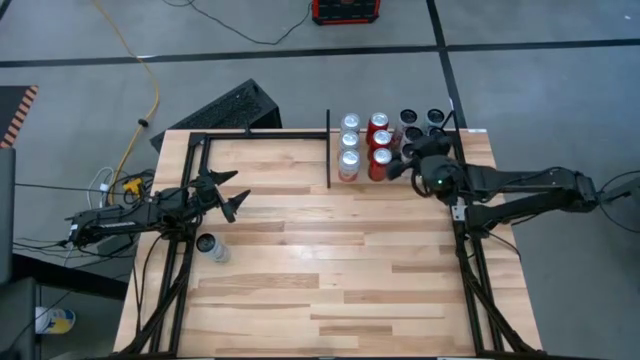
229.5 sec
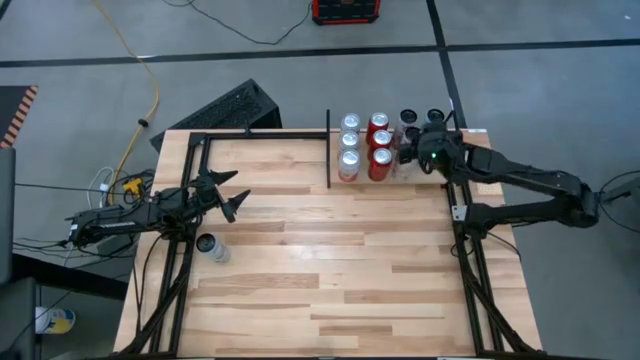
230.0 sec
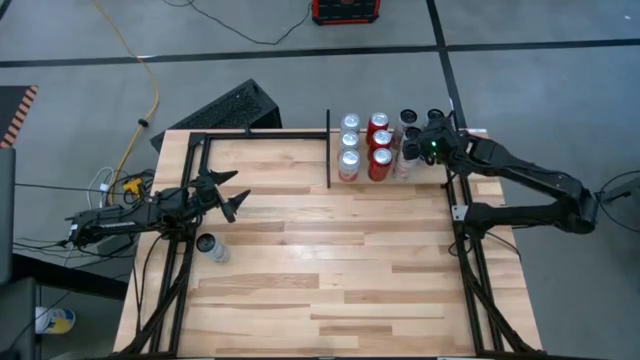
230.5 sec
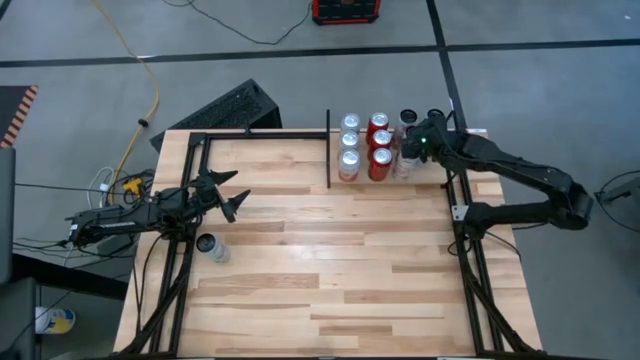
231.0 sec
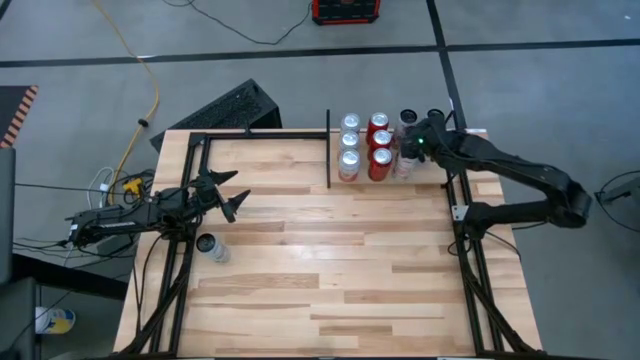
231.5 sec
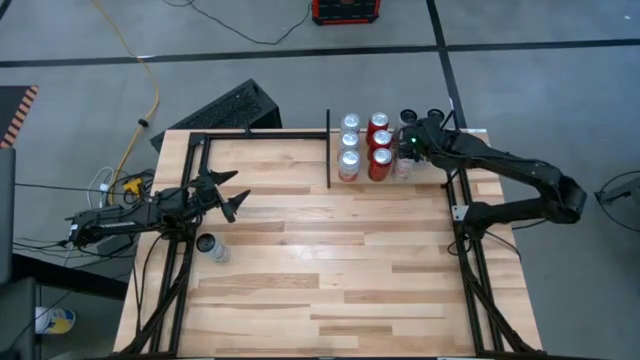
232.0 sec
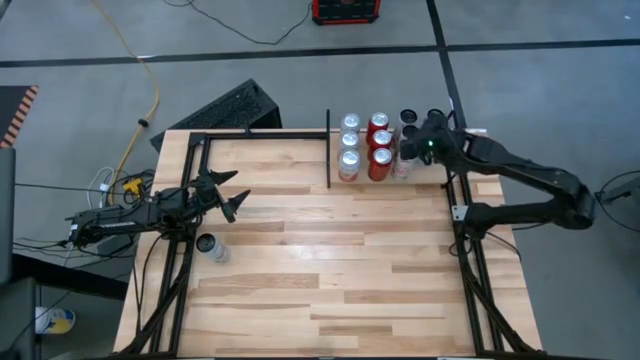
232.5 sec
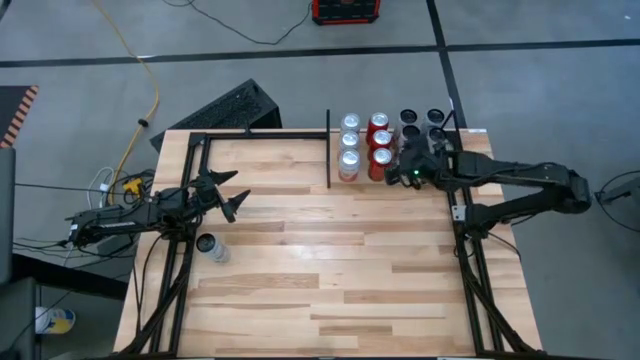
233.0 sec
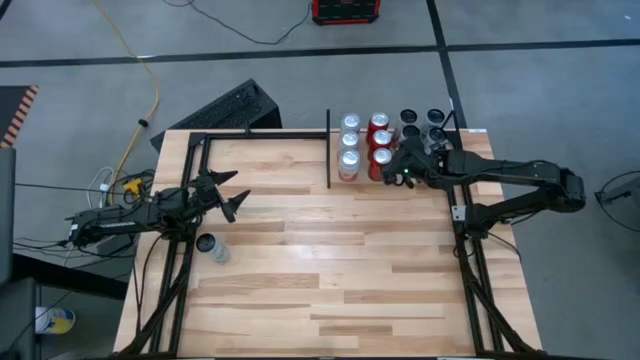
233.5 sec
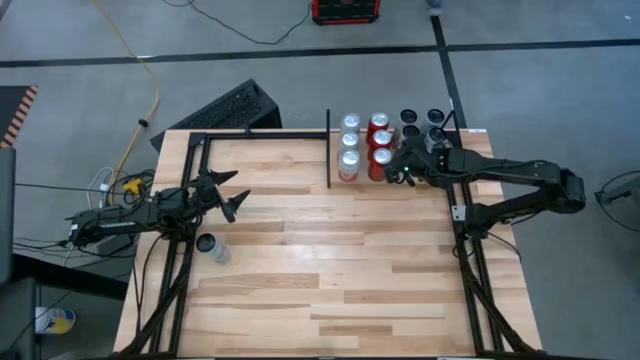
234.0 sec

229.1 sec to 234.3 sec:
Task: Place canned beverage on shelf
Adjust the black pink soda cans on the shelf

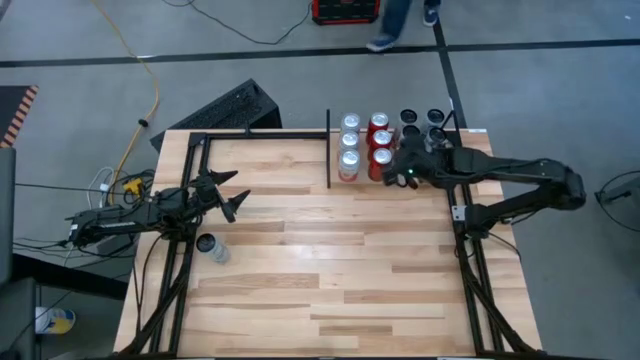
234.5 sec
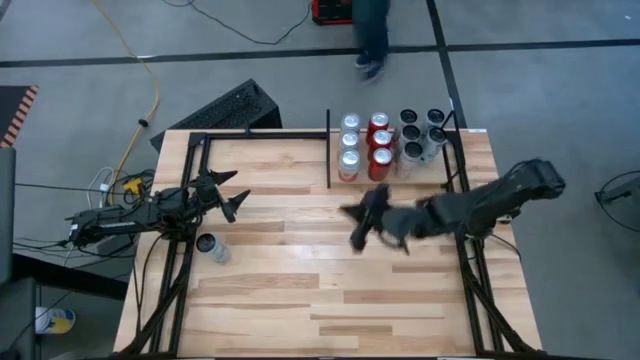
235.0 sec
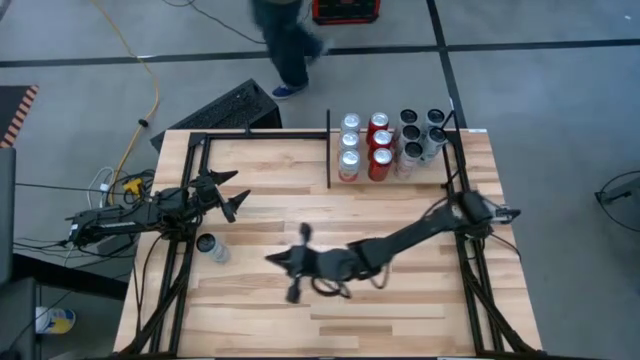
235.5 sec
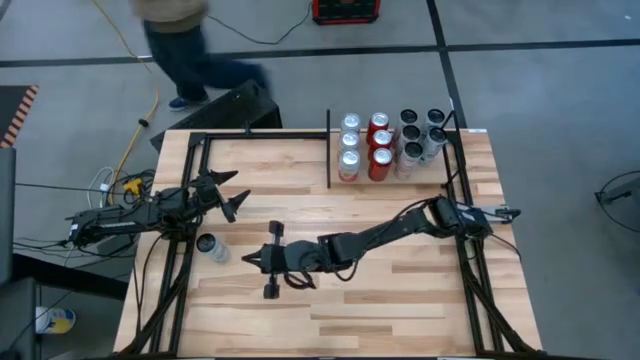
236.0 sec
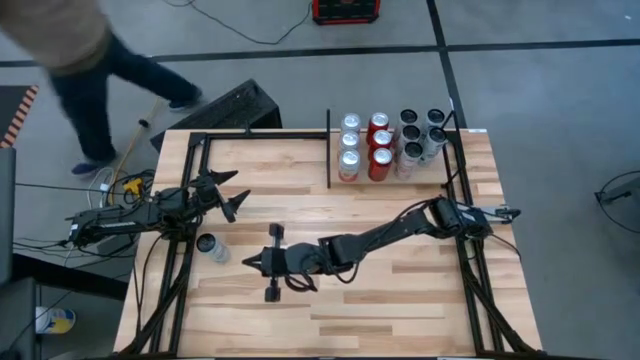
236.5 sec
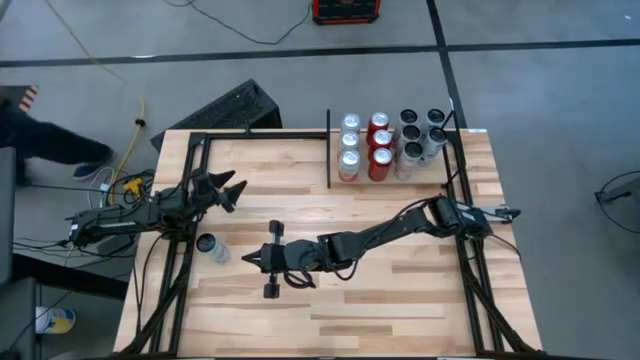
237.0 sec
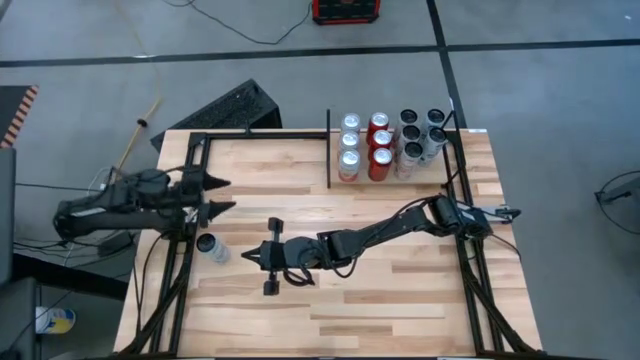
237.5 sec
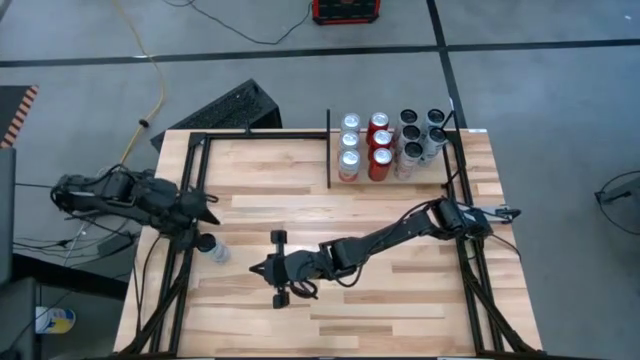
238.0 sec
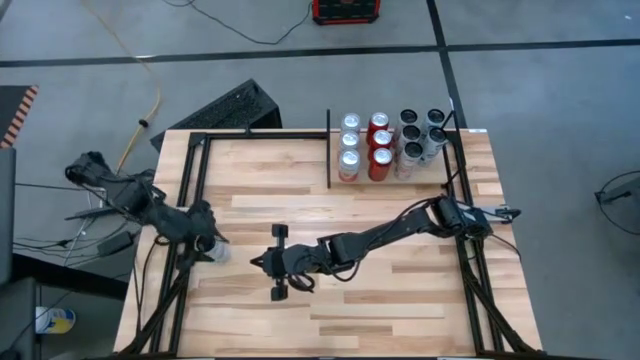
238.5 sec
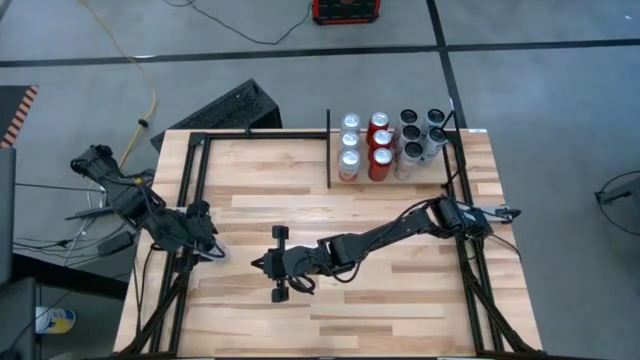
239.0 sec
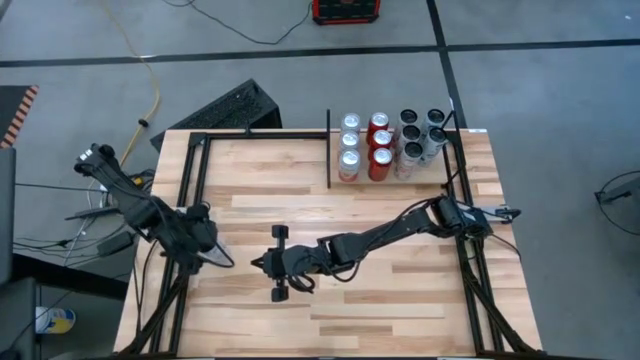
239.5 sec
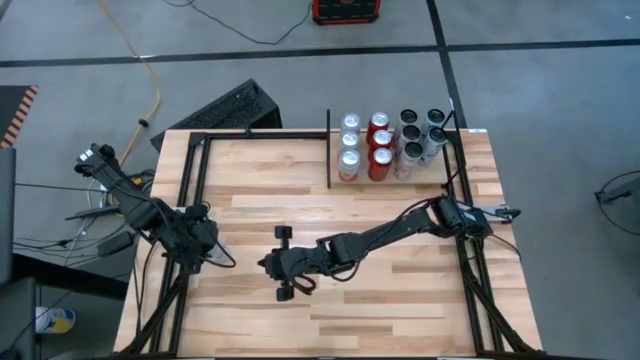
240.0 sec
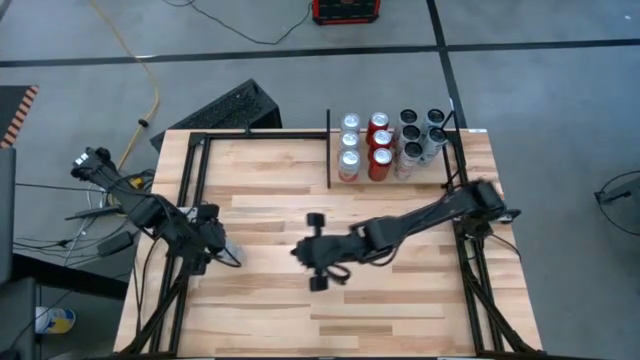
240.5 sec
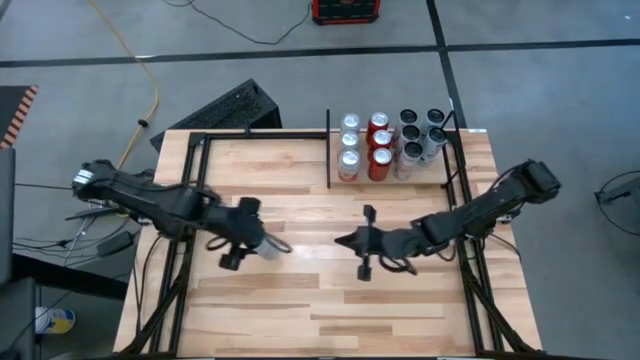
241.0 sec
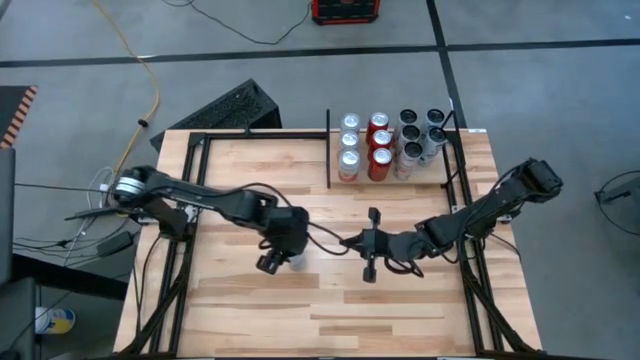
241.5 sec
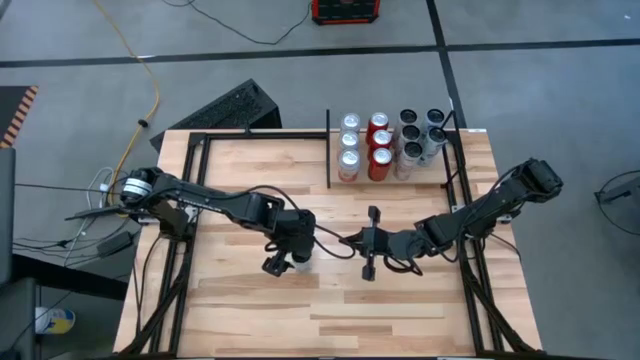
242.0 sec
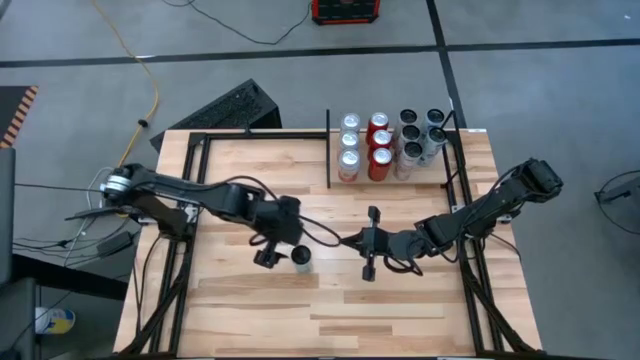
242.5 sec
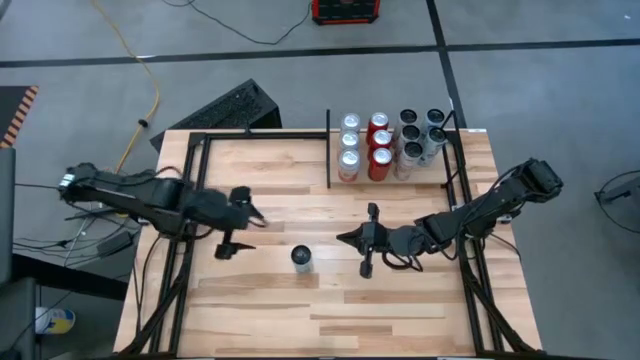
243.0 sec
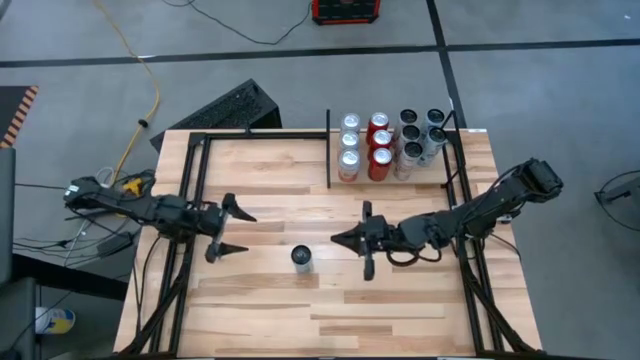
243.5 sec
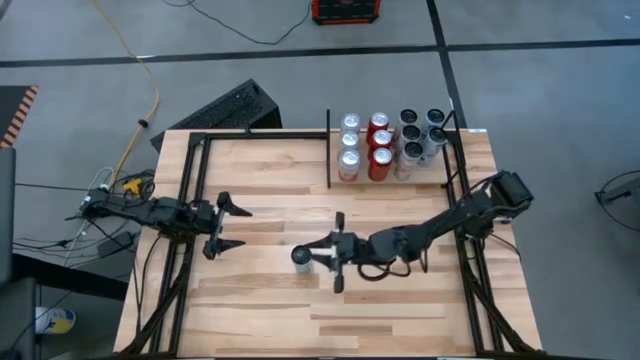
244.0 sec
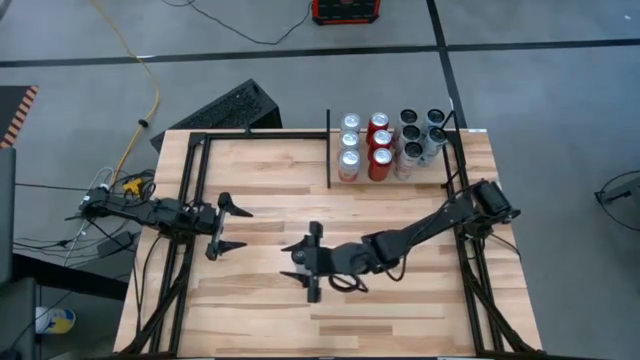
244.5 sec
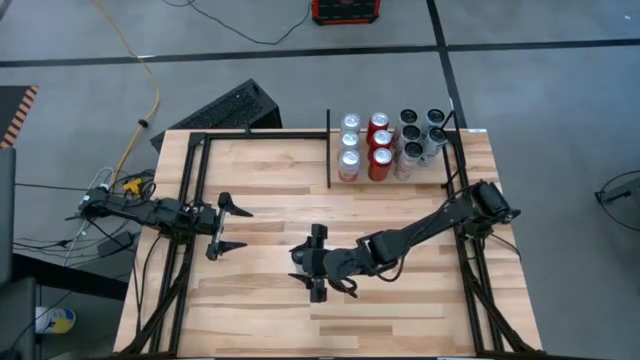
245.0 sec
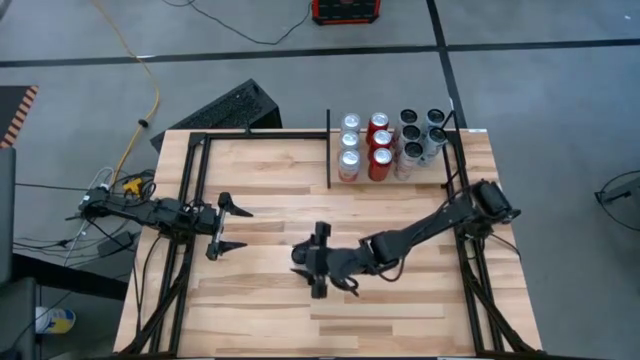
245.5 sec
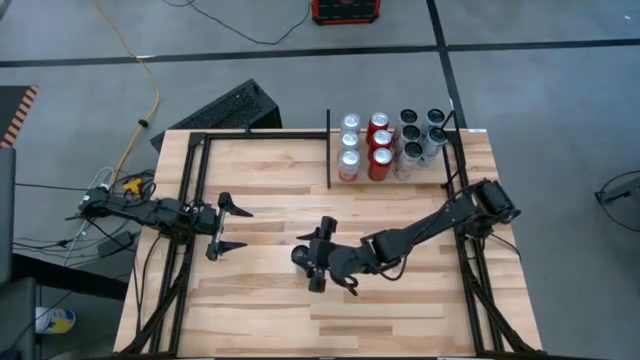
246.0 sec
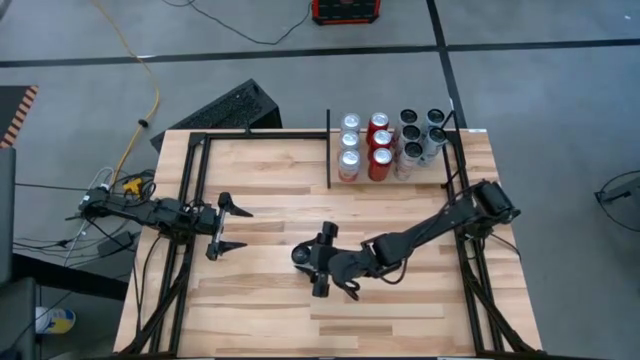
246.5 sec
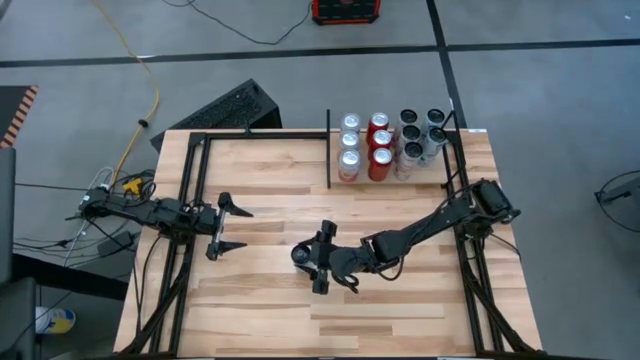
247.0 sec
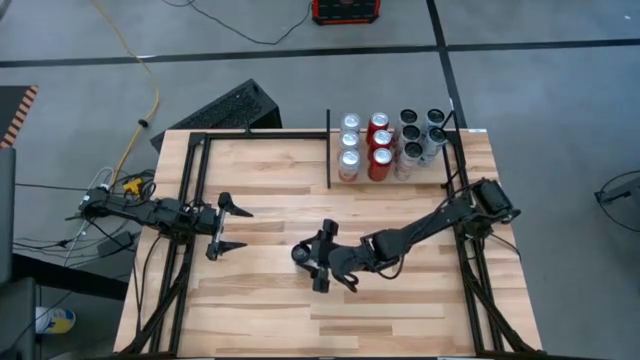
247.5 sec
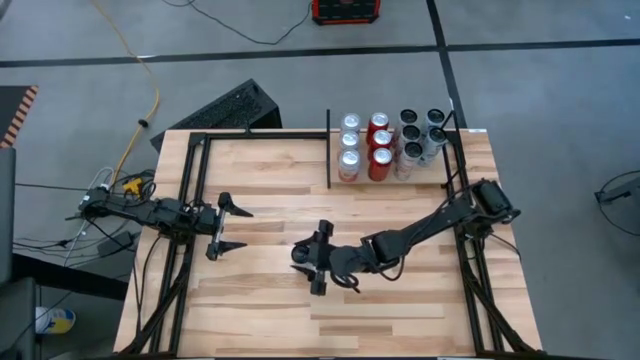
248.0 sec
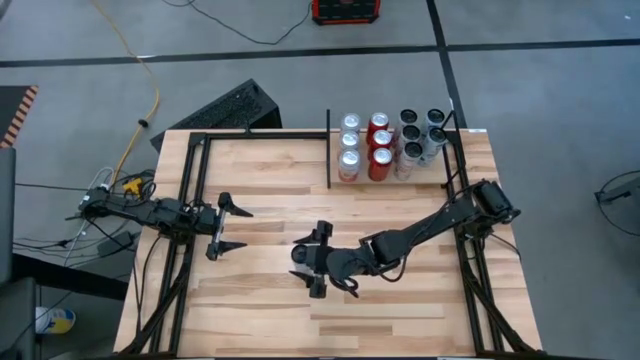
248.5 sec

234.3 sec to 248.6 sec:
Put the black blue soda can on the shelf

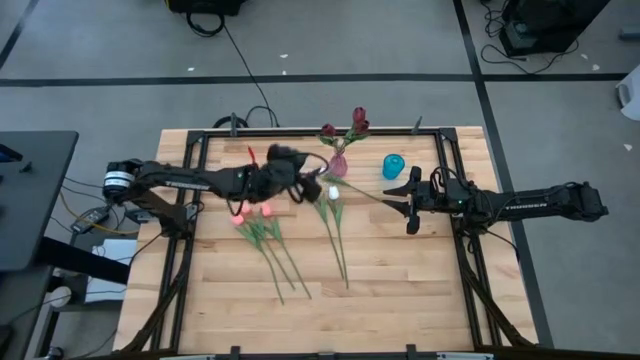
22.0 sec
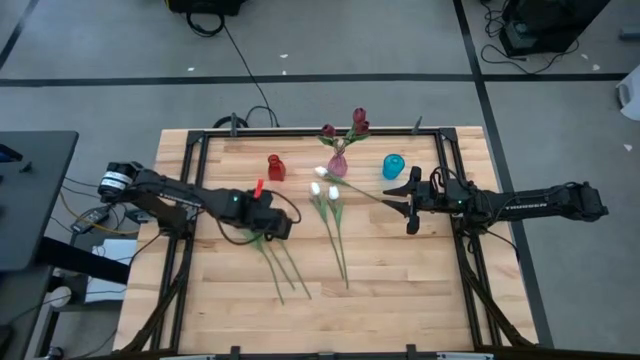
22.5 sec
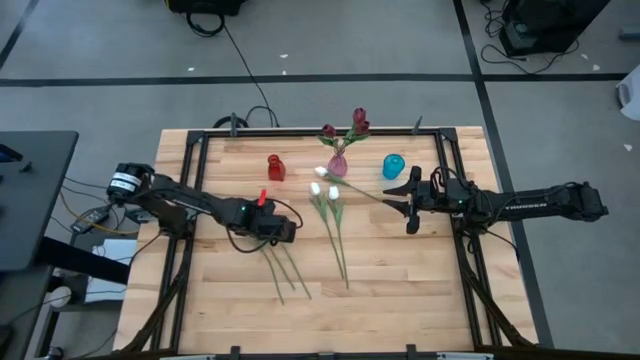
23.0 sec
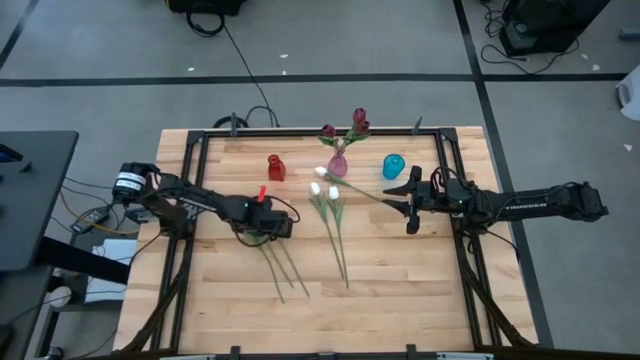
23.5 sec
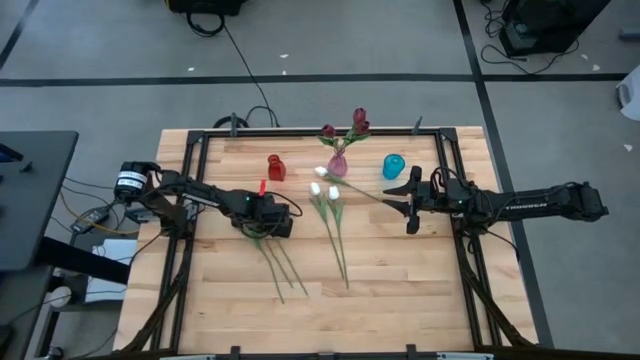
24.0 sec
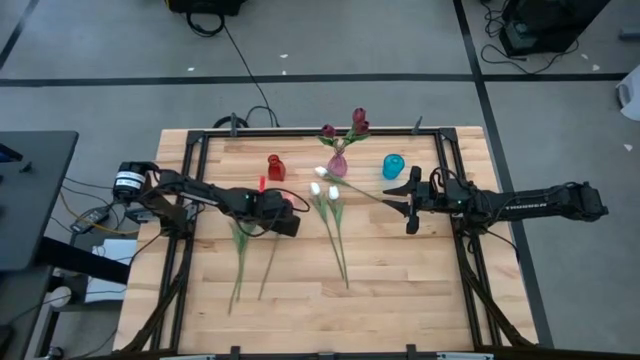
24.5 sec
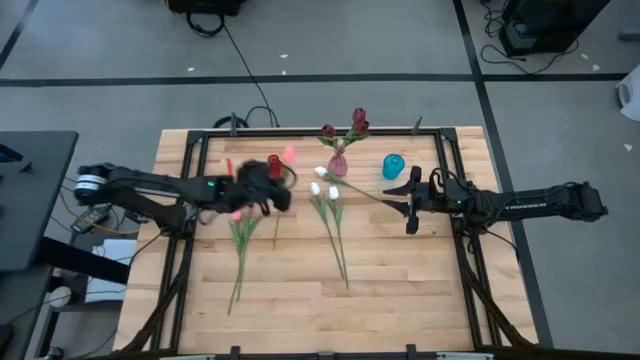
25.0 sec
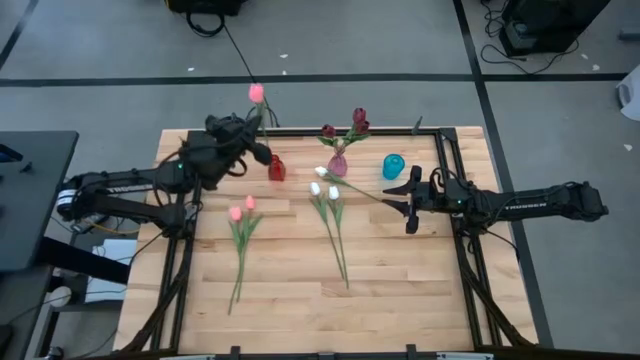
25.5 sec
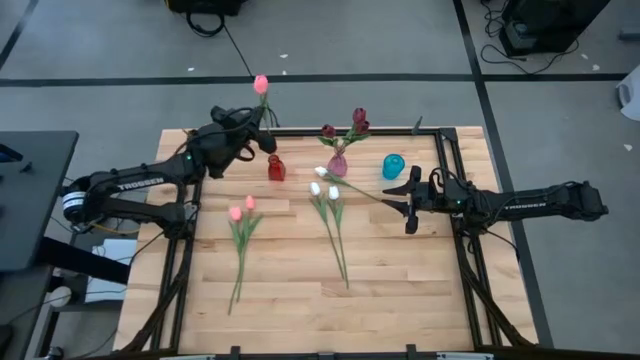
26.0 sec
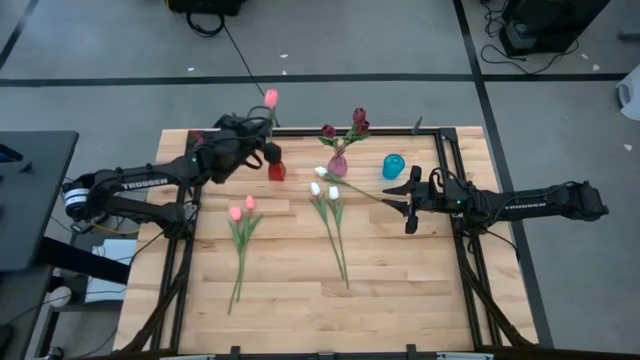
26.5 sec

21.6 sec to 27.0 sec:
Task: Sort flowers into vase by color
Put the right pink flower into the dark red vase
